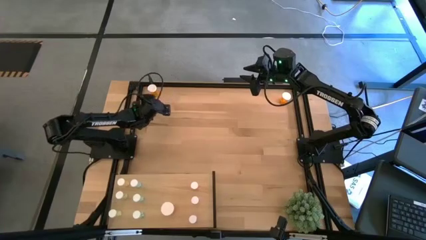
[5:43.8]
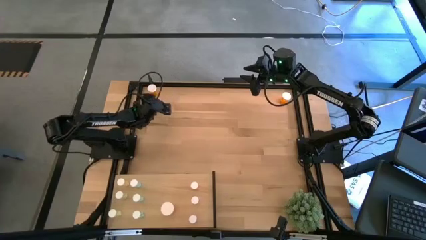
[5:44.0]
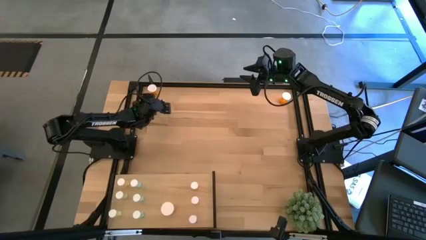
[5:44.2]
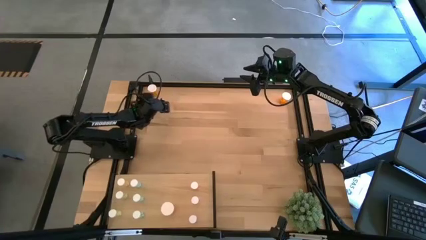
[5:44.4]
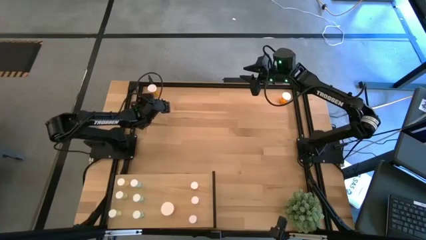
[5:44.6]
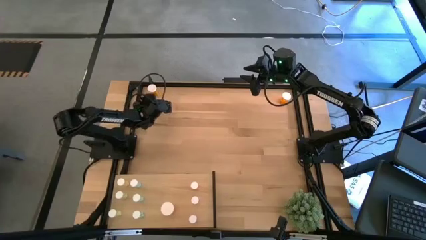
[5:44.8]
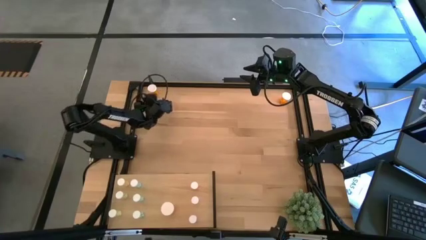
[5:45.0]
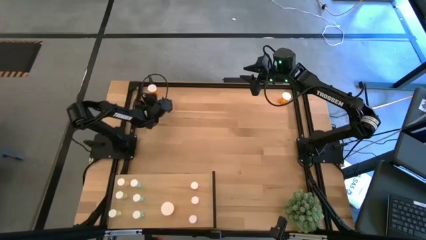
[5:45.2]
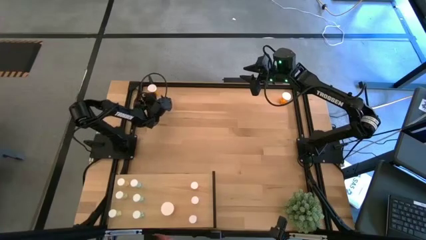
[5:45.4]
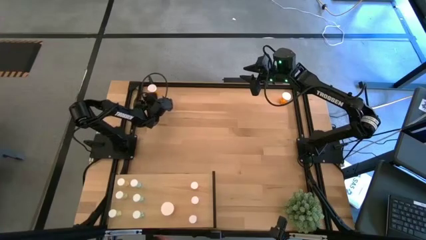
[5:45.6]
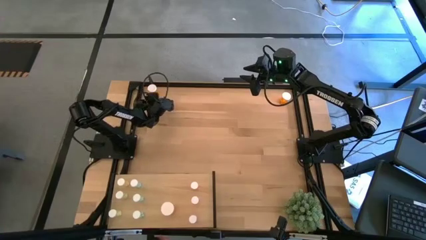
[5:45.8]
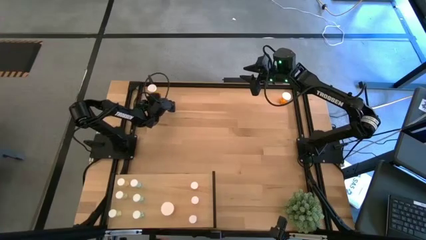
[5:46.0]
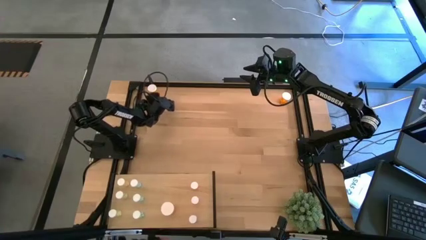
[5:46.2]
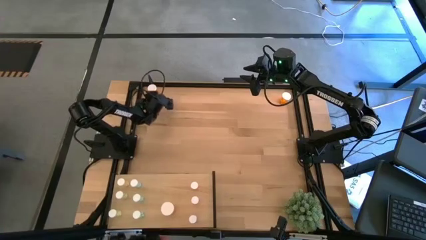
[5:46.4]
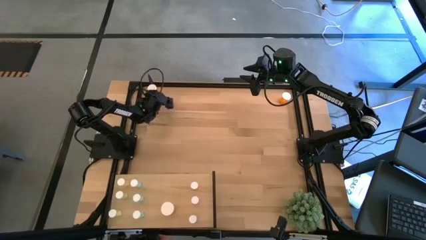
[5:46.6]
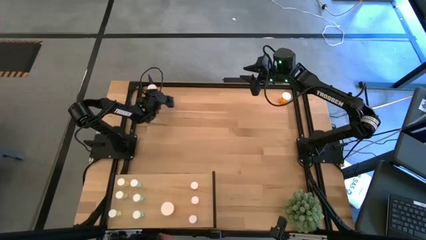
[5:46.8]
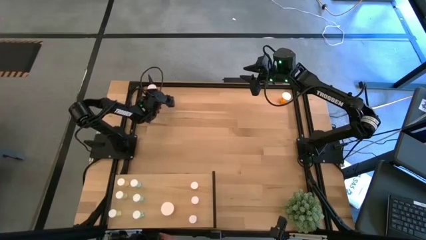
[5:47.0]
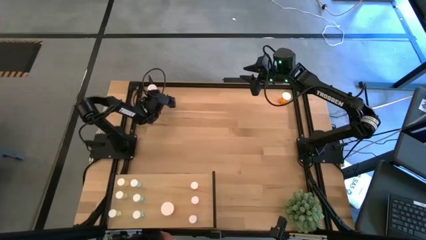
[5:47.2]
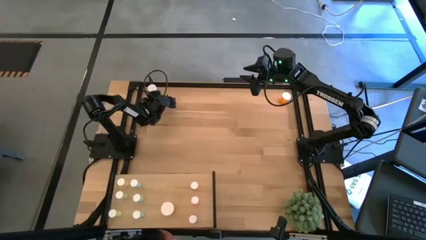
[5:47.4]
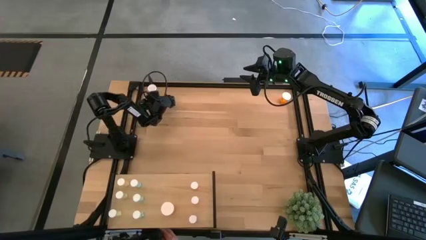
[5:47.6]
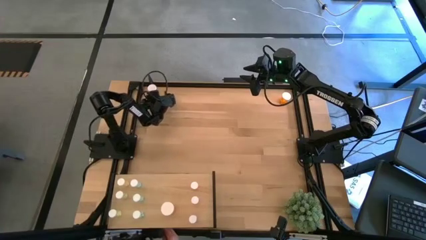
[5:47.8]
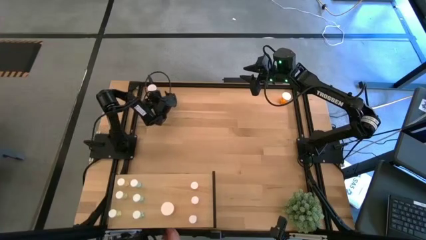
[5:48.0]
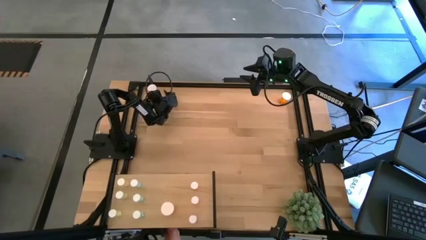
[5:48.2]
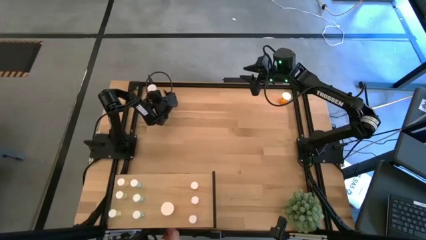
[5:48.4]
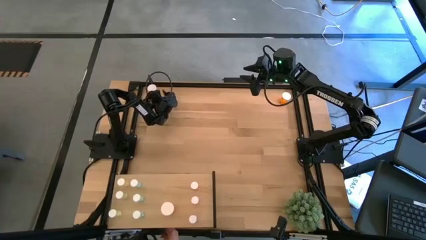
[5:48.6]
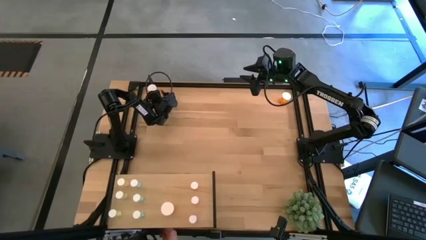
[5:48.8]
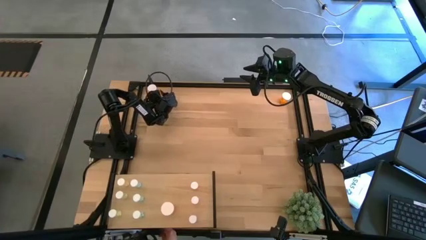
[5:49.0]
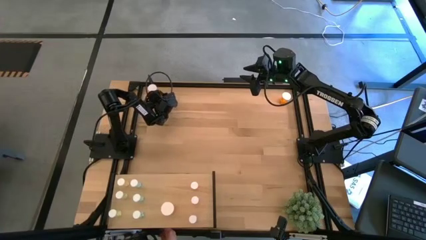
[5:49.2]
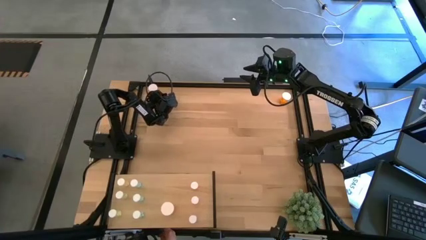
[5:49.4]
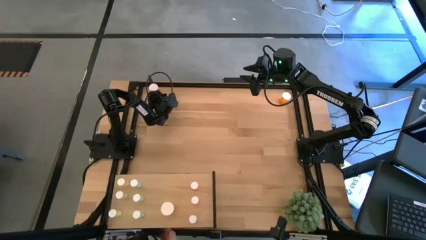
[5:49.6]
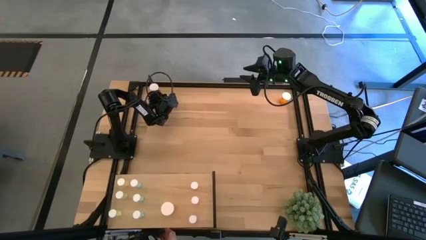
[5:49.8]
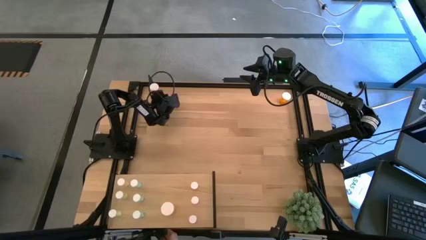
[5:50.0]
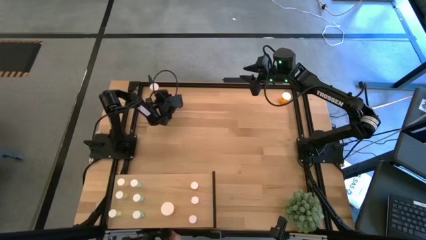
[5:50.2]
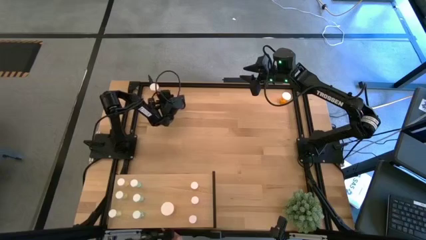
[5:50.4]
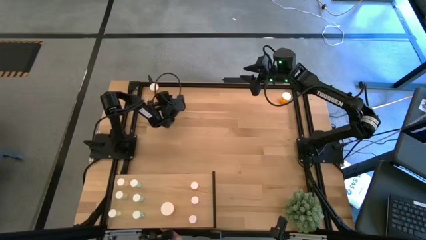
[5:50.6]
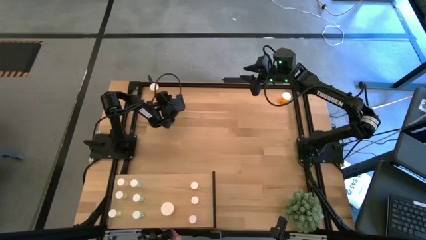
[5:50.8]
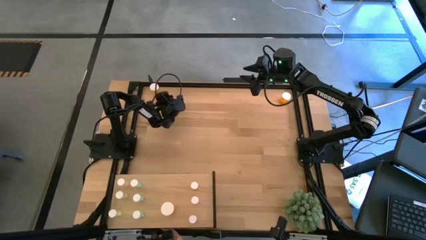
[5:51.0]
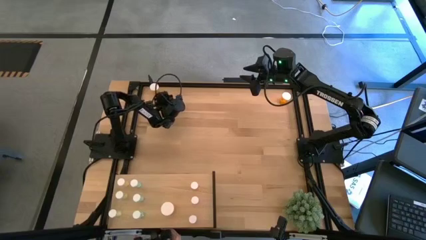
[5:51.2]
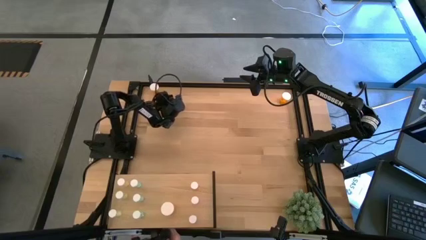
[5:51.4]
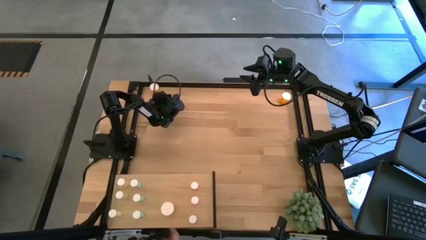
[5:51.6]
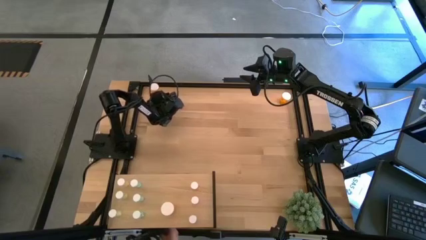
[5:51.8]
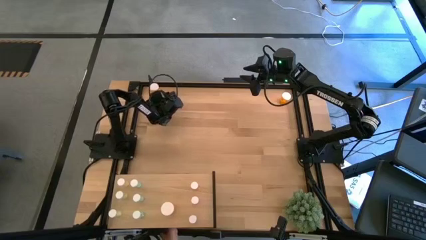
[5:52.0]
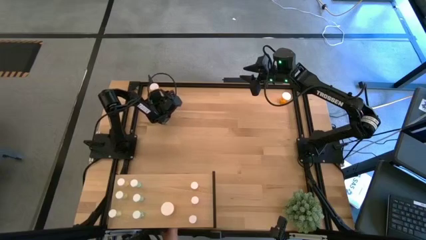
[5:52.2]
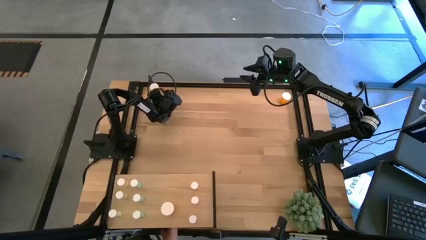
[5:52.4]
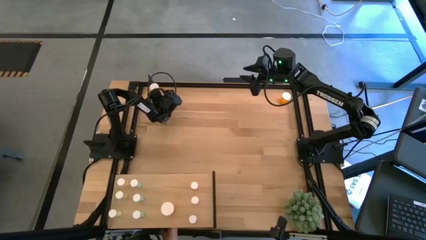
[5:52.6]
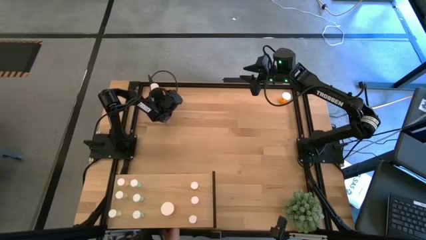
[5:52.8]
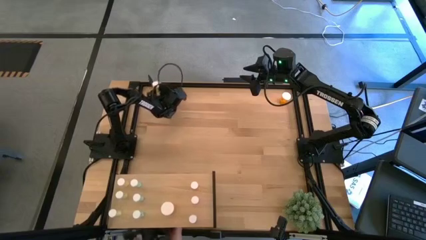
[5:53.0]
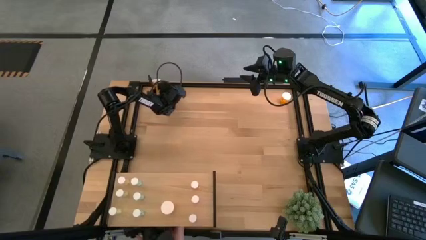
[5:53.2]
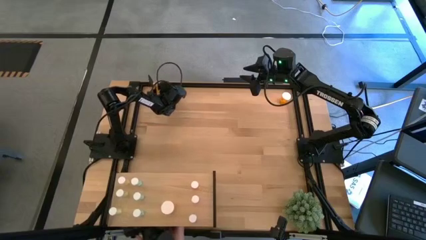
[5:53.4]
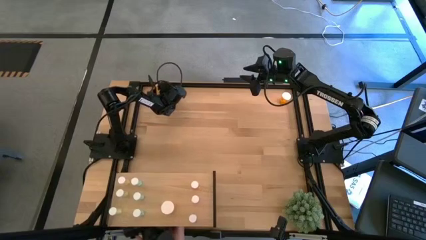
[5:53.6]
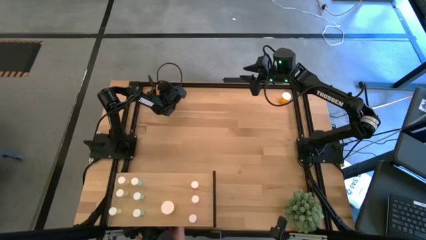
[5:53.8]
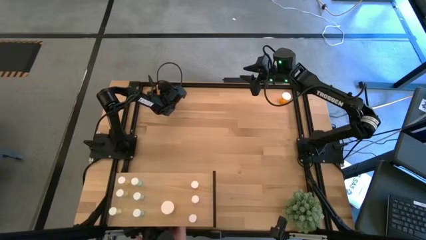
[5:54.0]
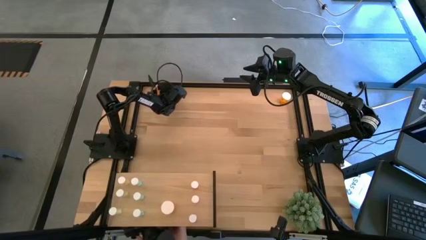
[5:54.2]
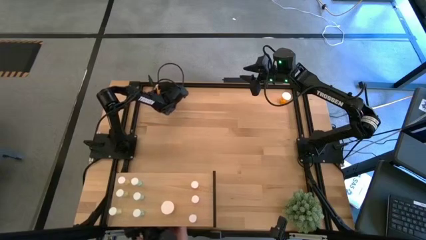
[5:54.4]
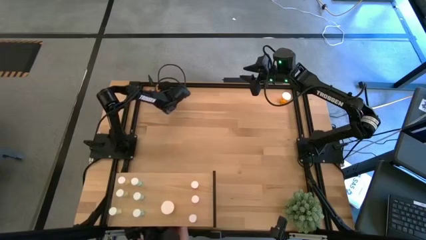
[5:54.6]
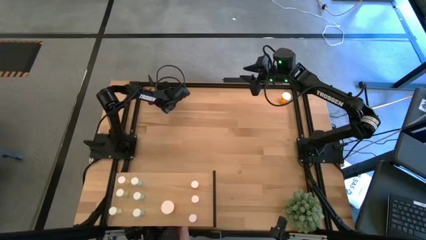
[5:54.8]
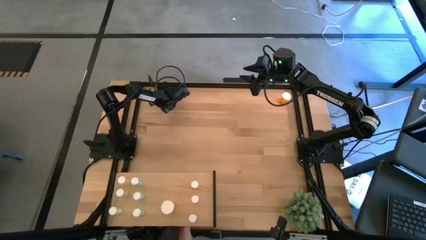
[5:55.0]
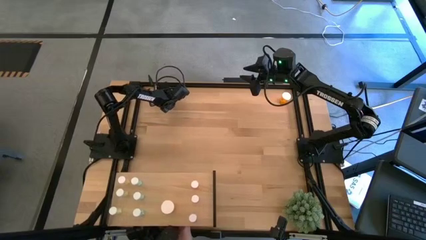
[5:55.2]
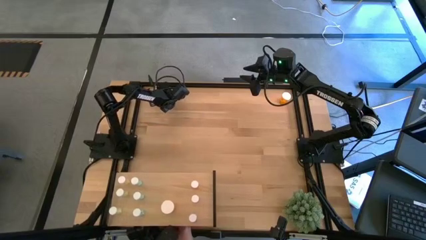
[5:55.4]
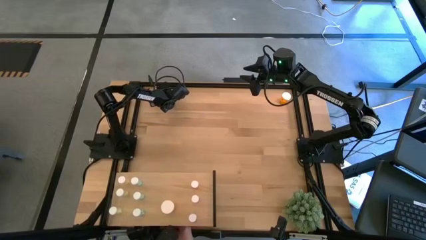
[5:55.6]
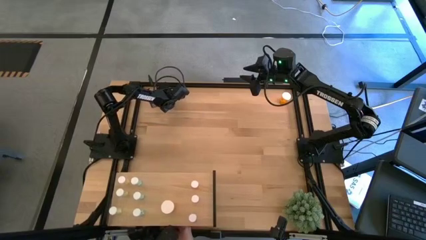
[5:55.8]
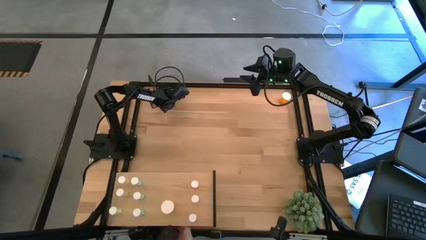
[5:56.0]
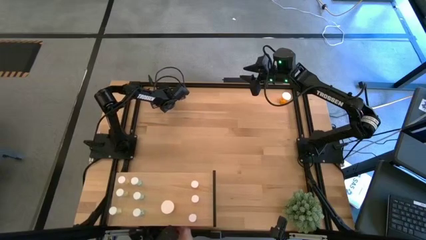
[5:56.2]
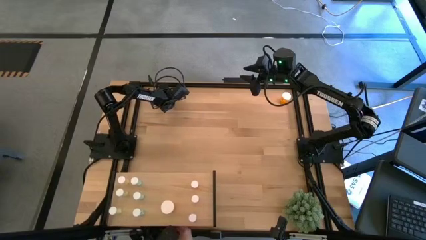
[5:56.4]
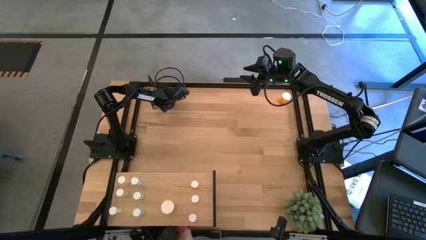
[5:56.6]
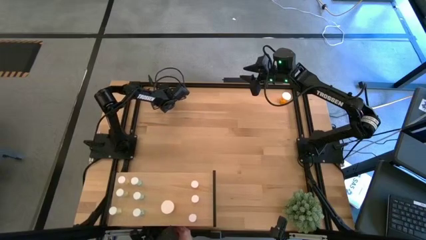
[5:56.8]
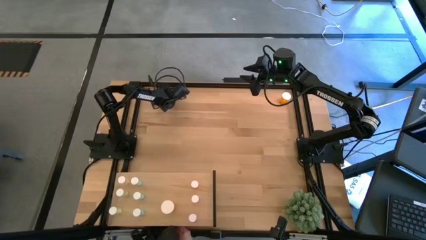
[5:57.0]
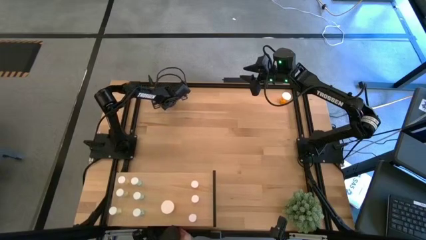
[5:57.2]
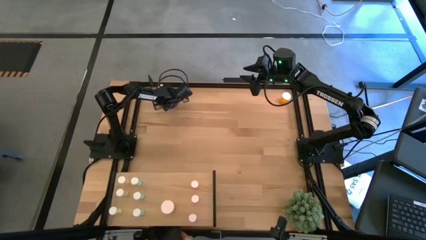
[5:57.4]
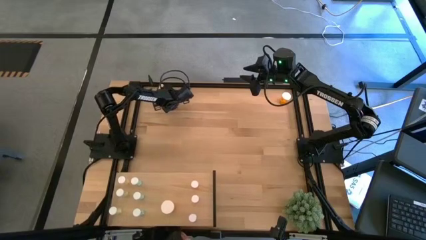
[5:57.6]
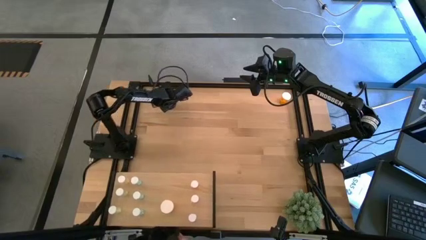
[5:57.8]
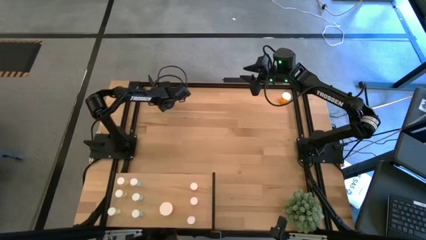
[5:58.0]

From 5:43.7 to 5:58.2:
Task: Pick and place medicine bottles onto shelf by color
Put the top left orange pill bottle on the shelf aligned with the other orange pill bottle

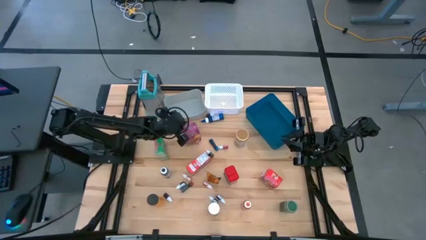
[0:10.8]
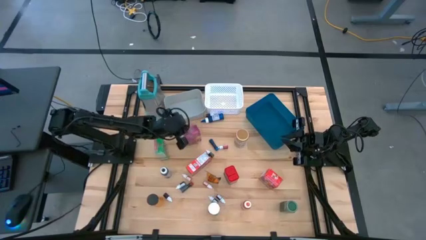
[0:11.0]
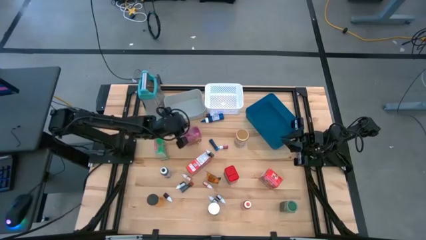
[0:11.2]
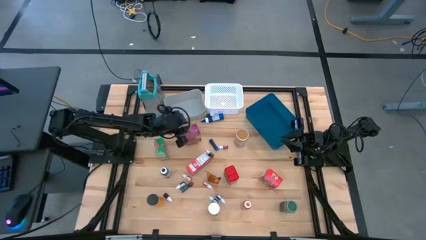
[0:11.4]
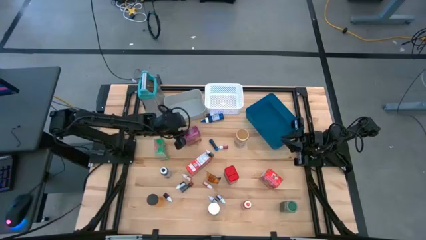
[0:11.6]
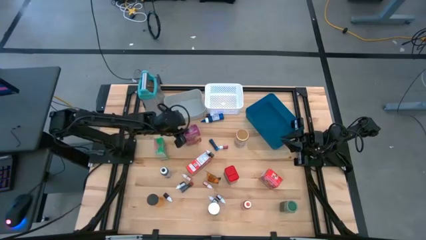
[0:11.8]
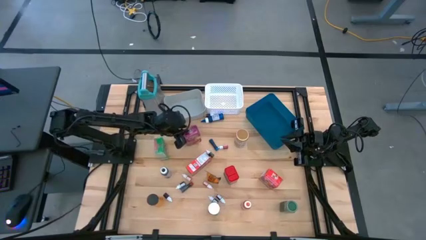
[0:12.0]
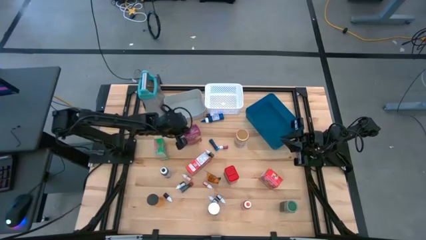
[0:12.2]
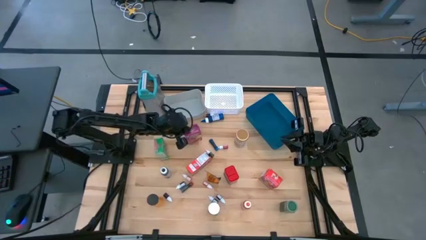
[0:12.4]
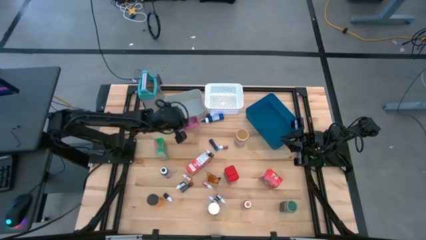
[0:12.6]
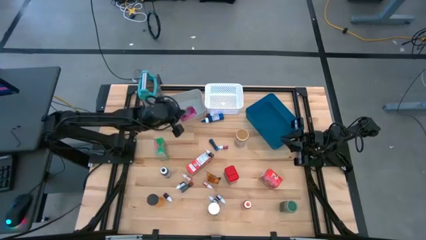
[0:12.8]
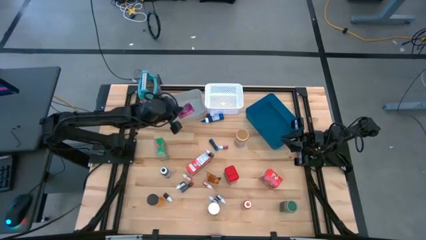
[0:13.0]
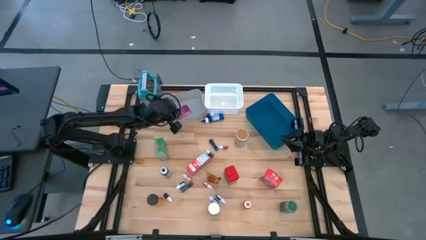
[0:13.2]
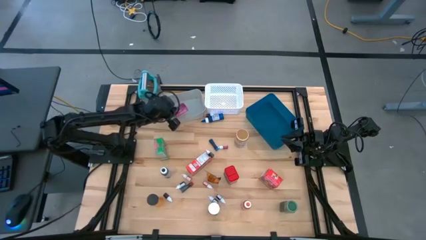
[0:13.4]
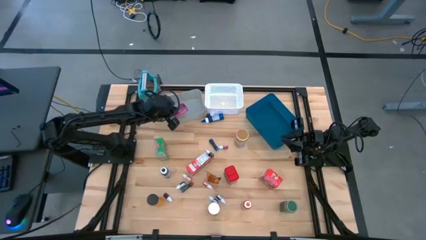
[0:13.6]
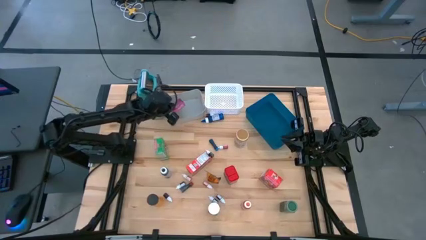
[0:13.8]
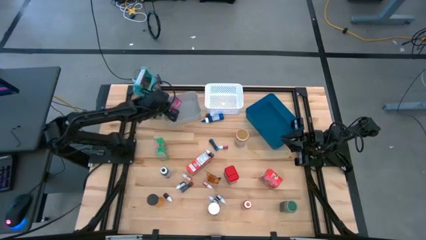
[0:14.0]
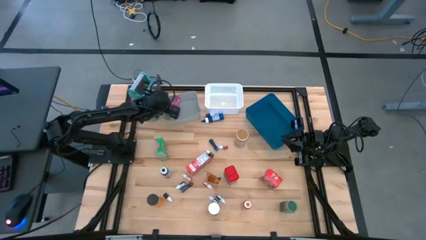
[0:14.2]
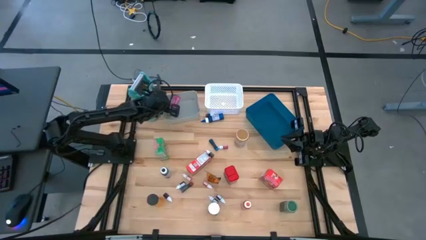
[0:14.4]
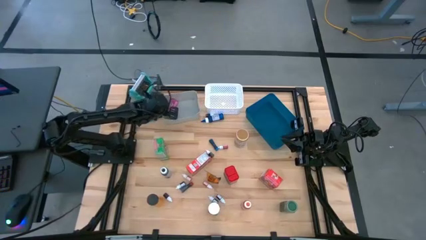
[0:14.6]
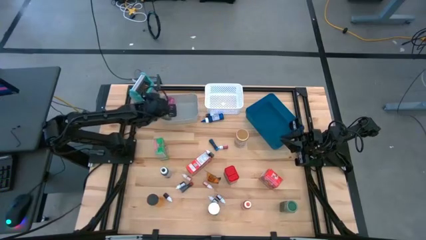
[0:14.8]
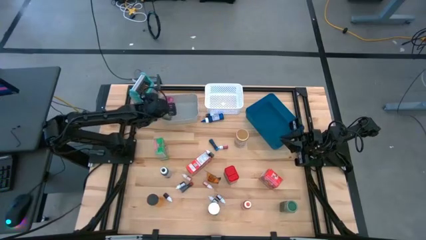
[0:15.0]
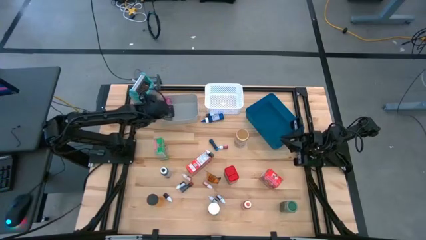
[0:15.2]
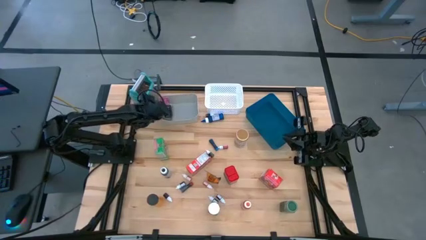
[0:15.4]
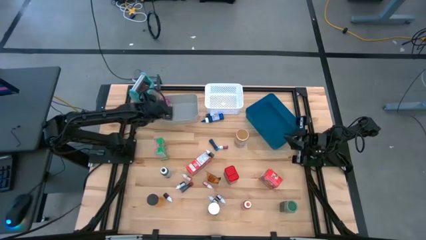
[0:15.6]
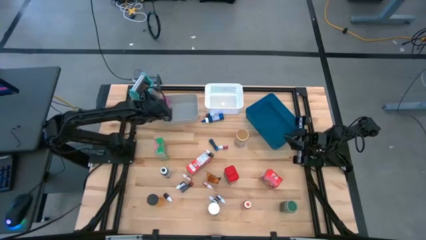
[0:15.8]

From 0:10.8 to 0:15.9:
Task: Pick & Place Kitchen Items
Put the pink cereal box into the gray bin
